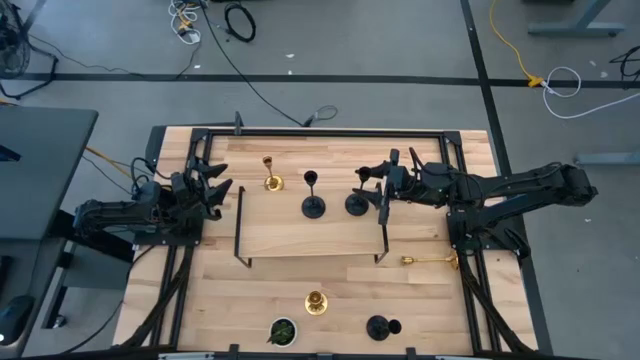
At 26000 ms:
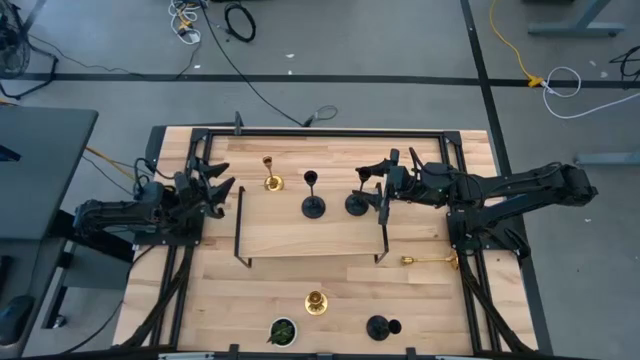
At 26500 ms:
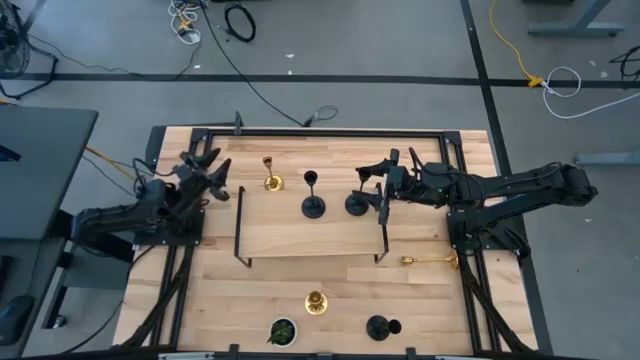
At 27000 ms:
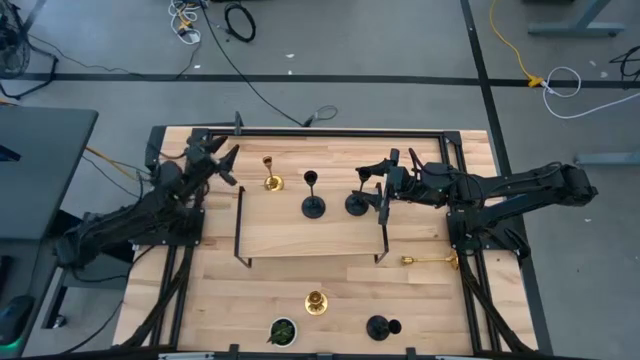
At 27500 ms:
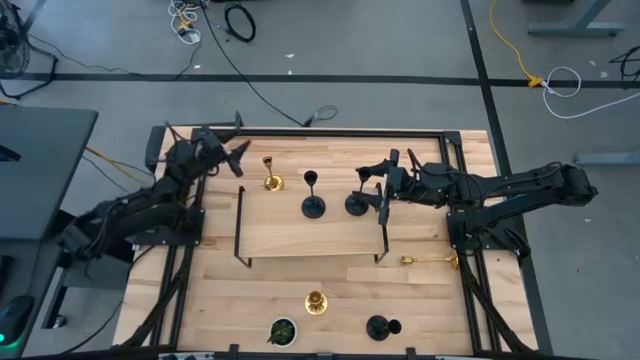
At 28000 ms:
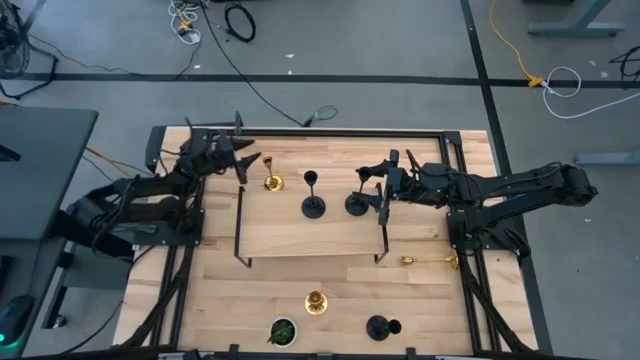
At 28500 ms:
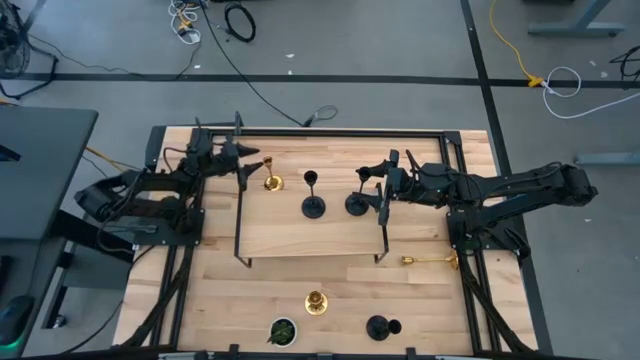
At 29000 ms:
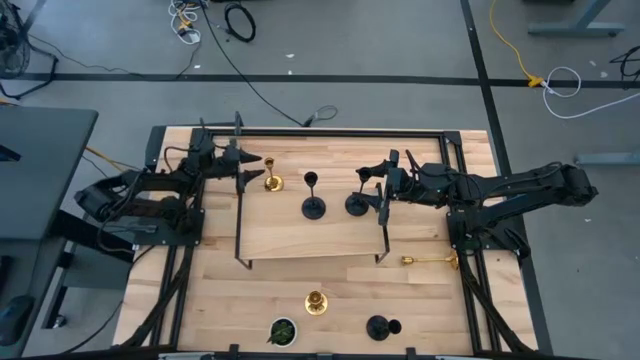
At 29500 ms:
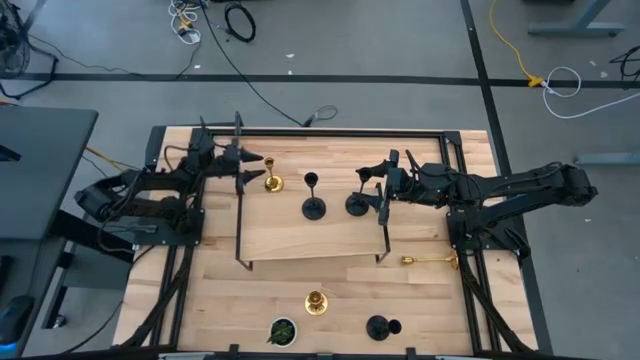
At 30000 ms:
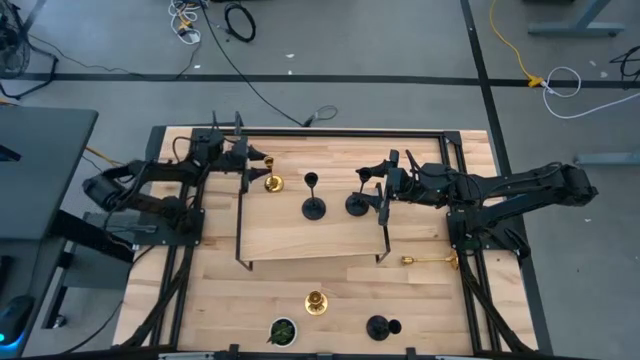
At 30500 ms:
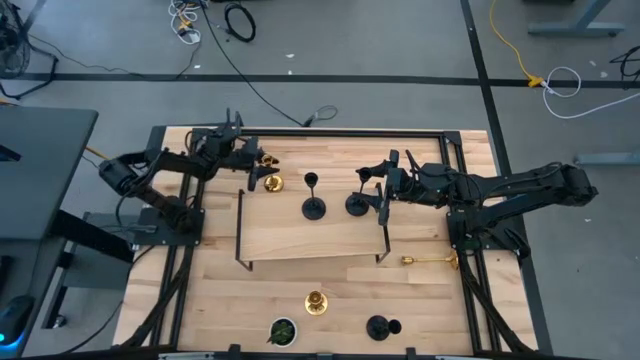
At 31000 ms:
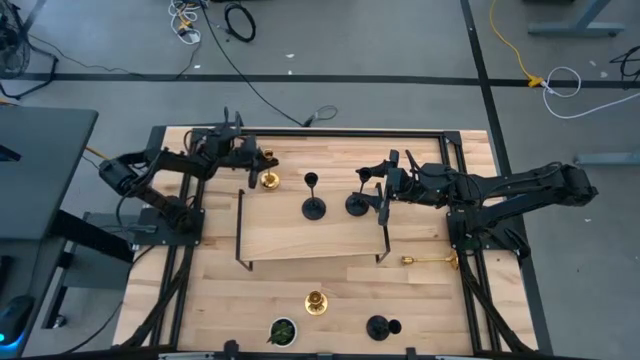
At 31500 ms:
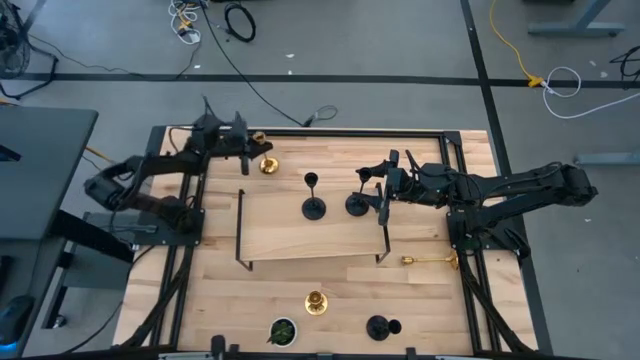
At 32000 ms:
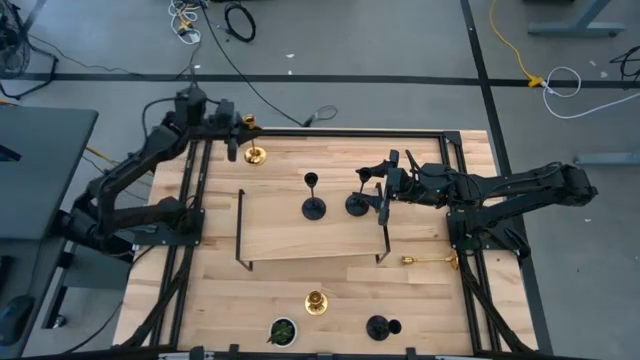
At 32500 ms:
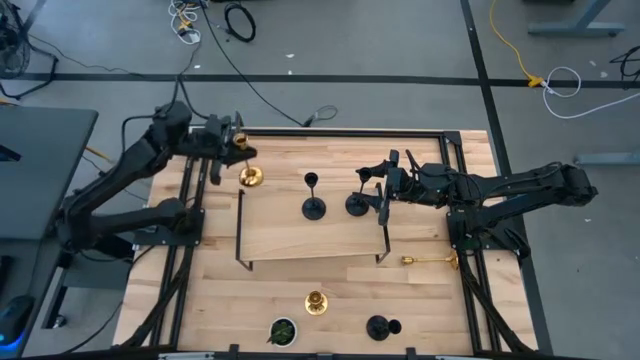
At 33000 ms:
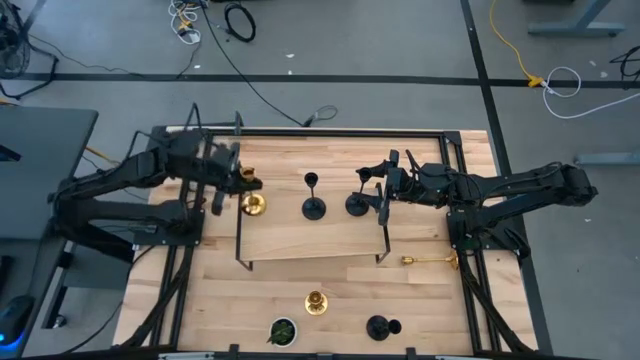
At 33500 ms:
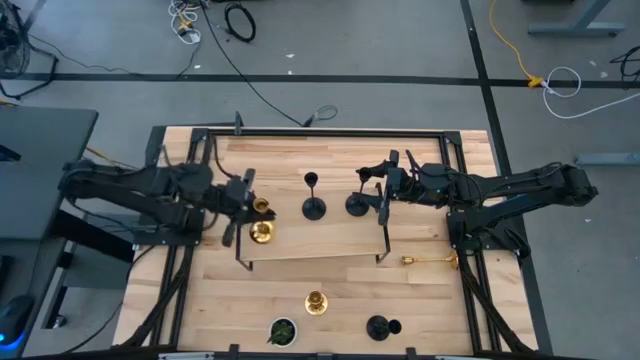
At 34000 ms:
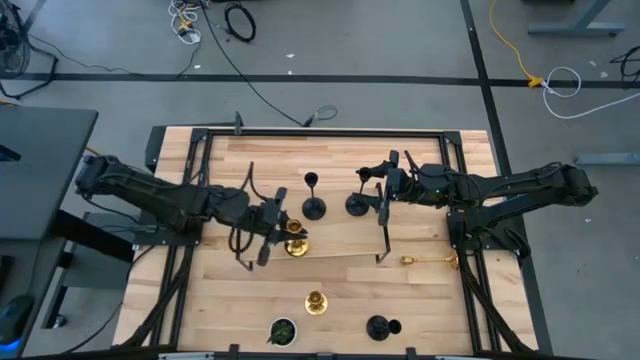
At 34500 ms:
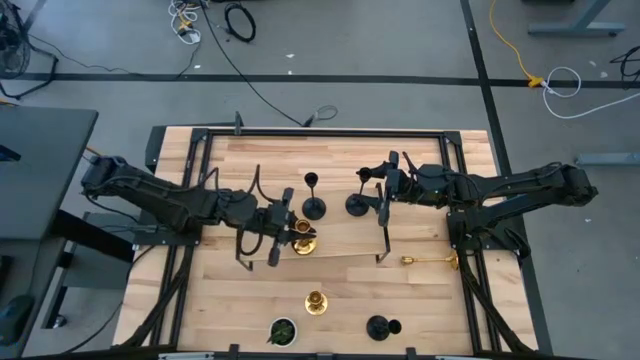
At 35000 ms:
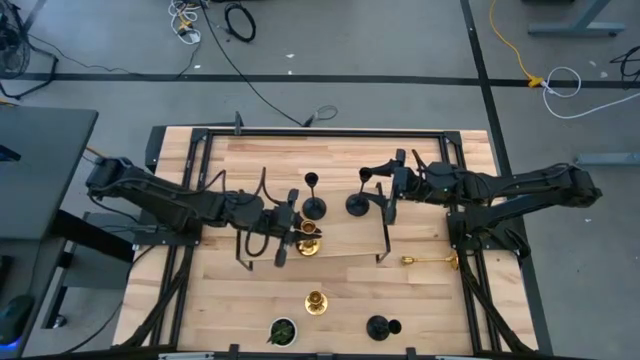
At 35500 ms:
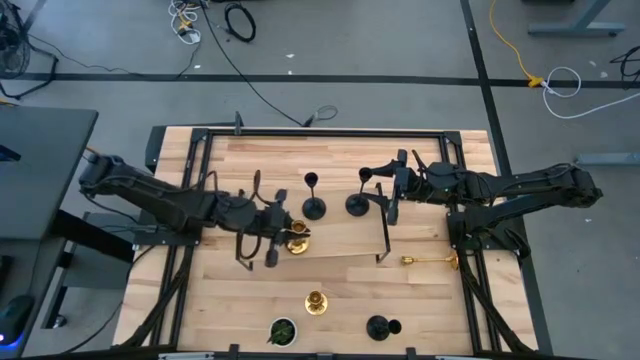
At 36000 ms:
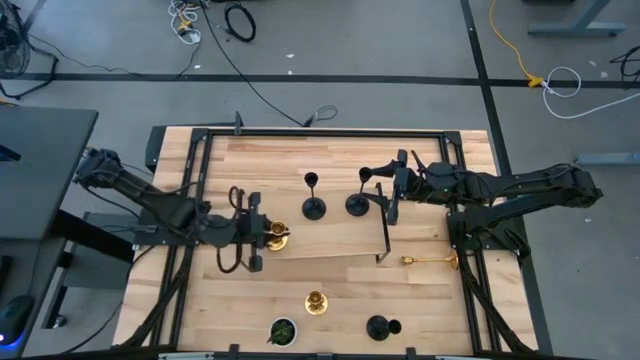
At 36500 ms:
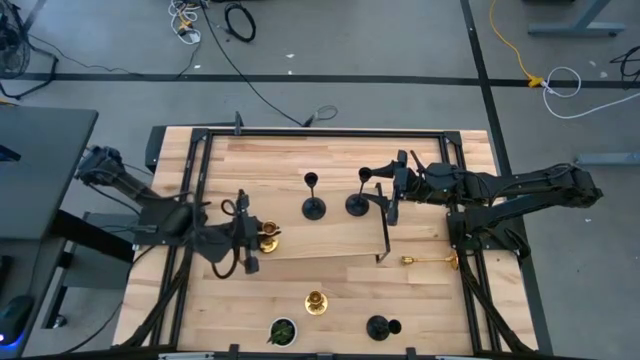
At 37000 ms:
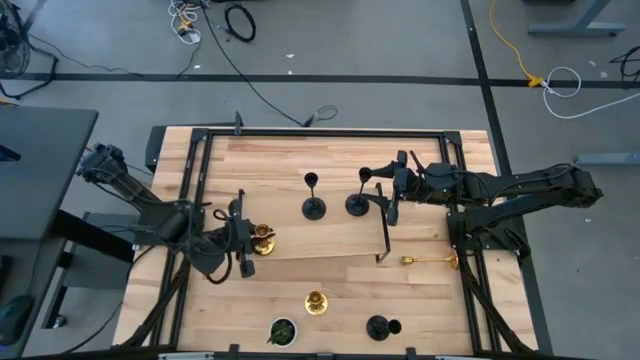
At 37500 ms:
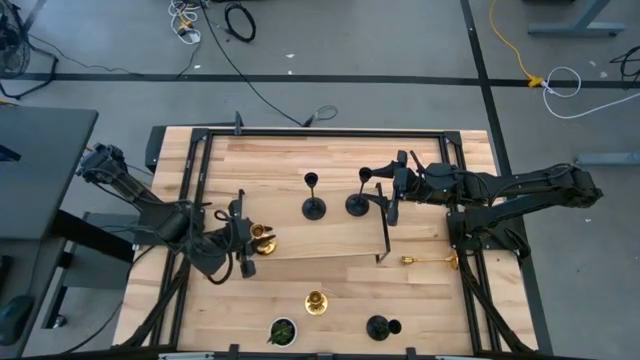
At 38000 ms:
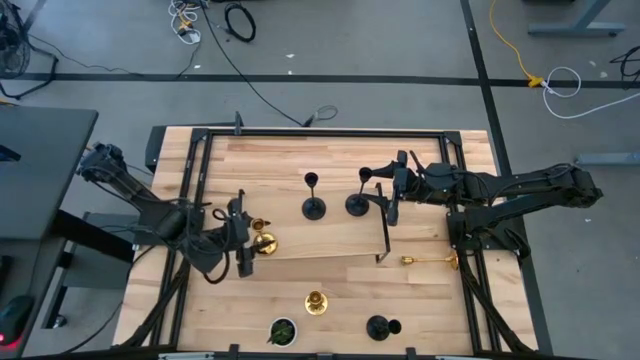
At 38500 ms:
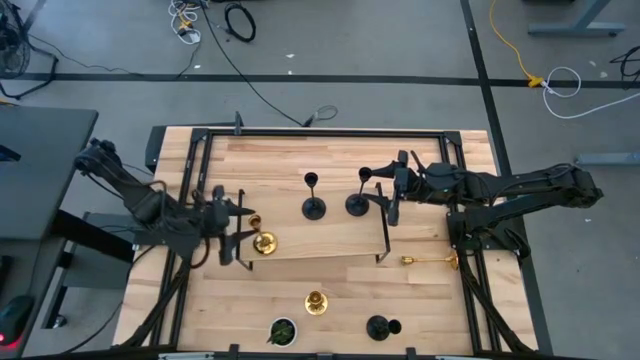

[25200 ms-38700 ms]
Task: Pick & Place candle stick holders
Put the top gold candle holder on the shelf

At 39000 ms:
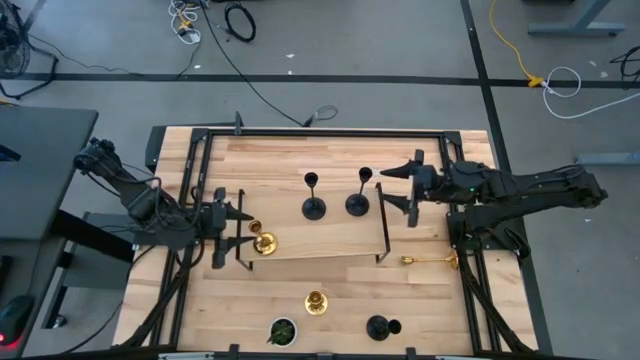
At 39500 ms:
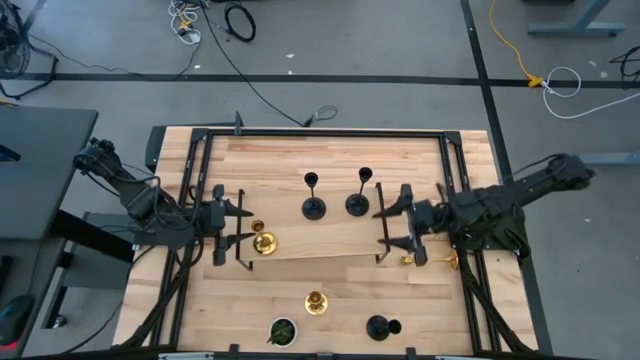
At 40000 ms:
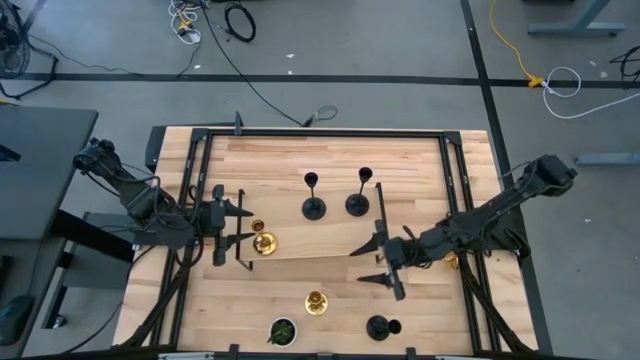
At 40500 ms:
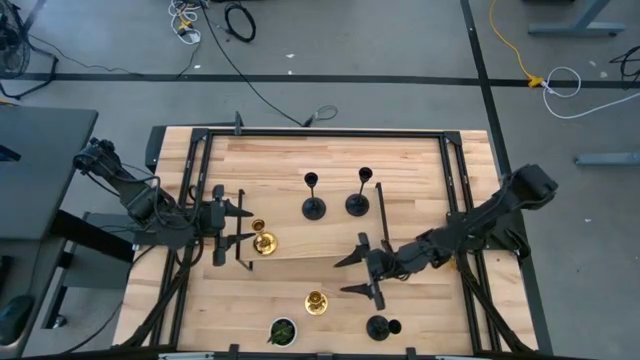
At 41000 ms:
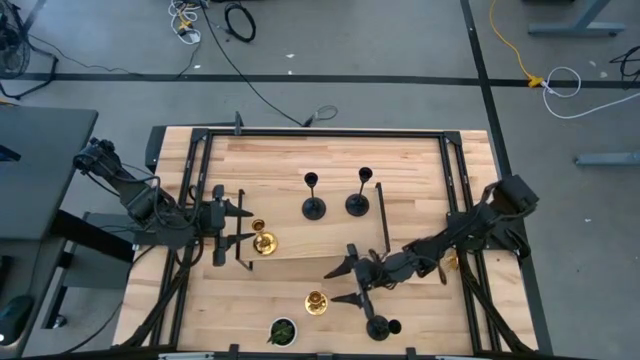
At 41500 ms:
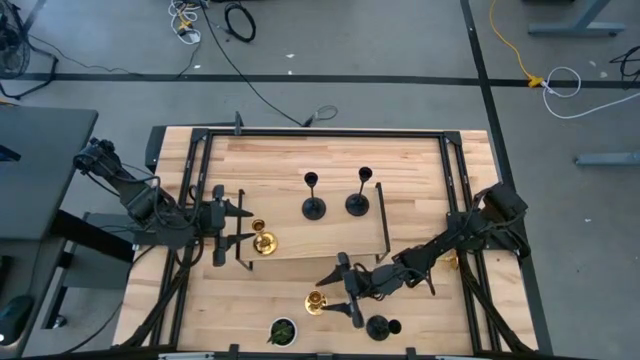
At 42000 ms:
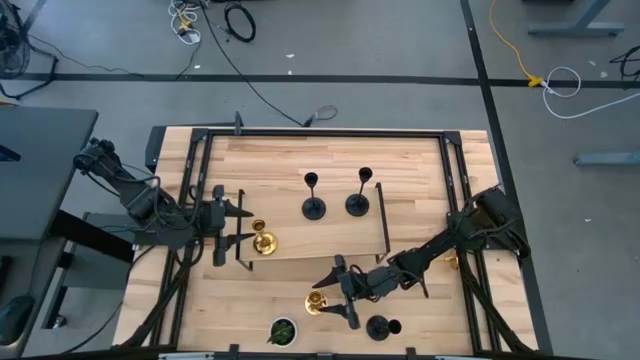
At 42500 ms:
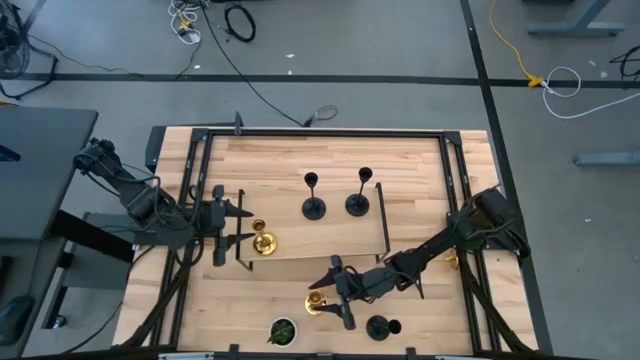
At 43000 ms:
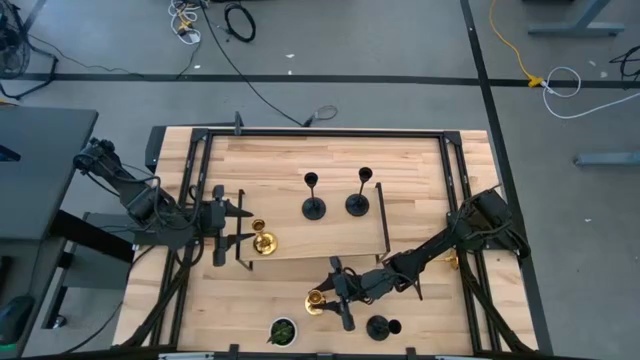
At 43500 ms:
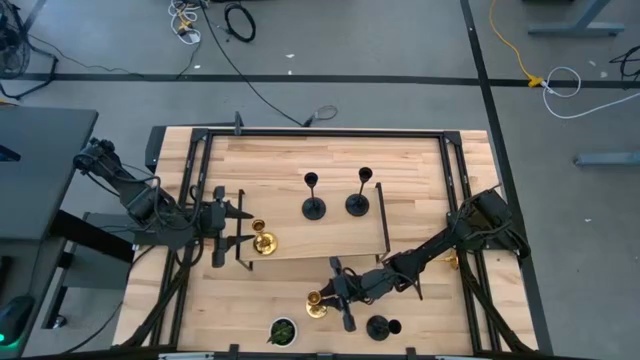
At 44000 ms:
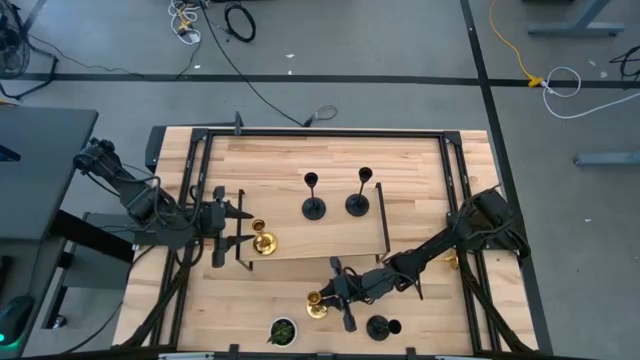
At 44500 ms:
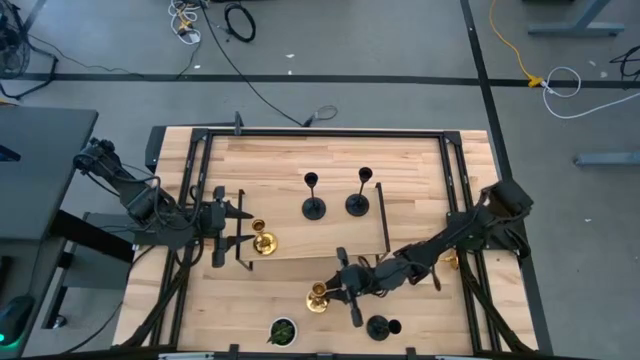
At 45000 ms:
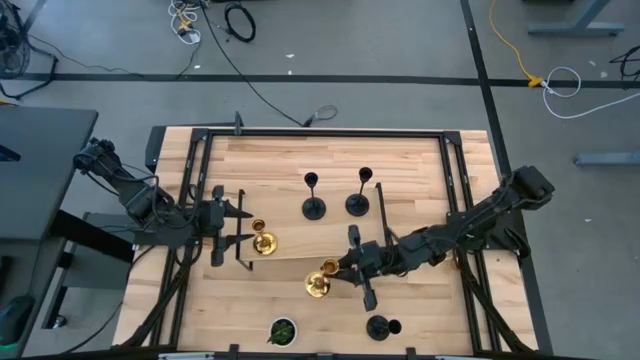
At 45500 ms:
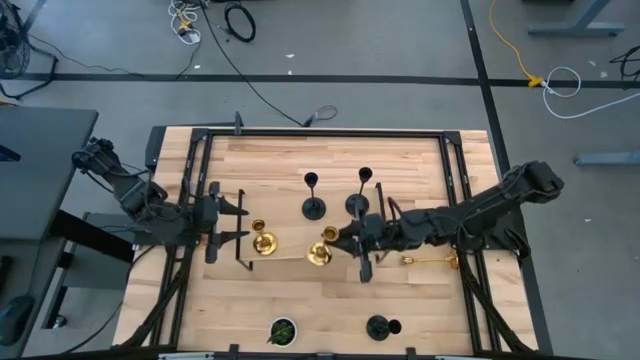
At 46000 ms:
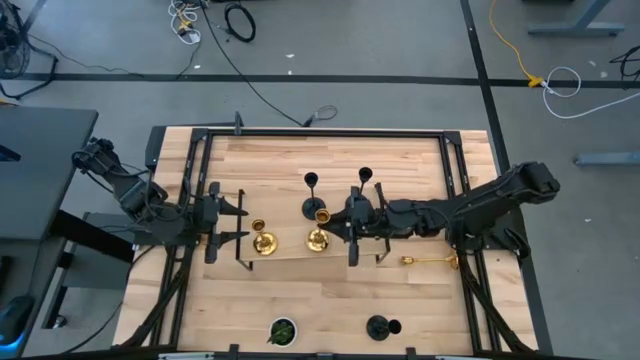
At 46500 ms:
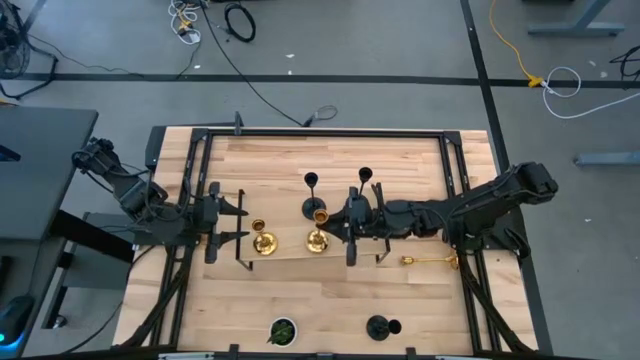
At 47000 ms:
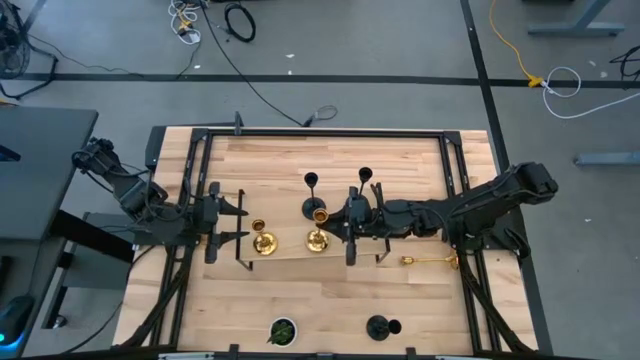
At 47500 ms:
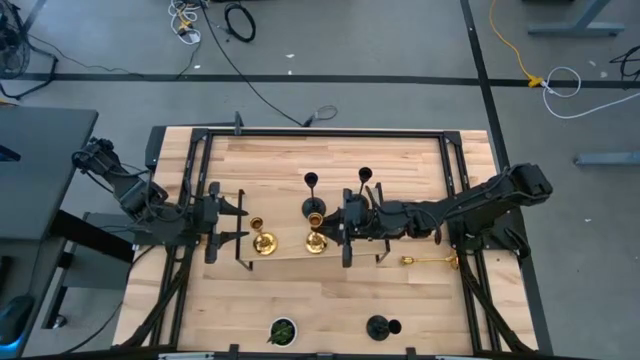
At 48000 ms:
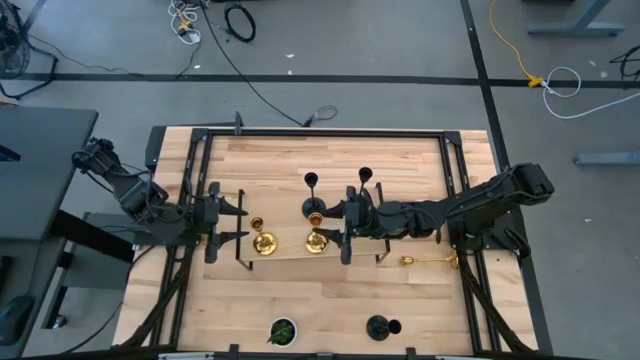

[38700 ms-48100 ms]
Put the bottom gold candle holder aligned with the other gold candle holder on the shelf
